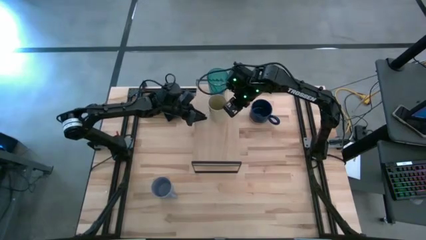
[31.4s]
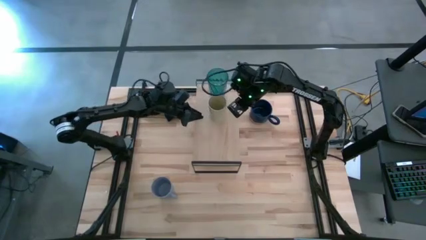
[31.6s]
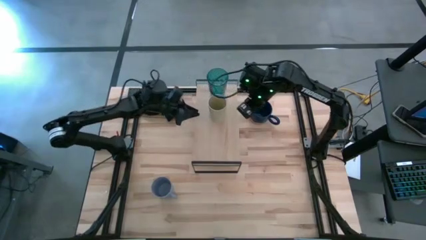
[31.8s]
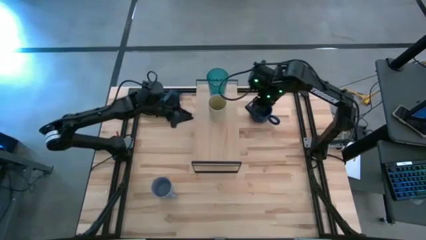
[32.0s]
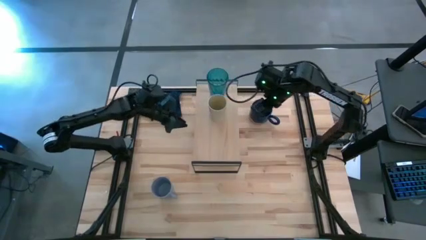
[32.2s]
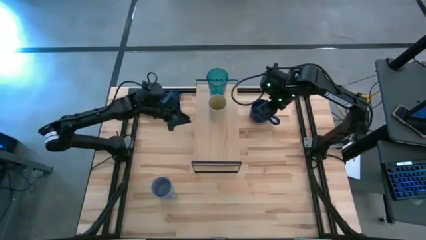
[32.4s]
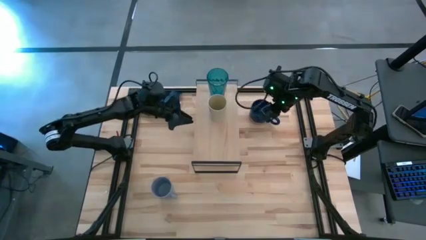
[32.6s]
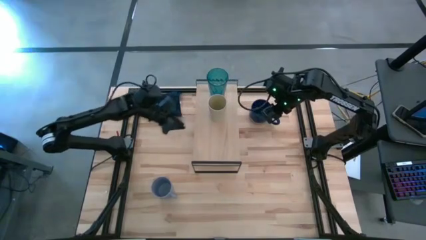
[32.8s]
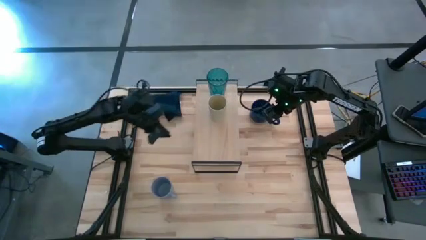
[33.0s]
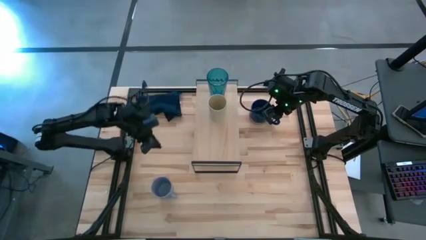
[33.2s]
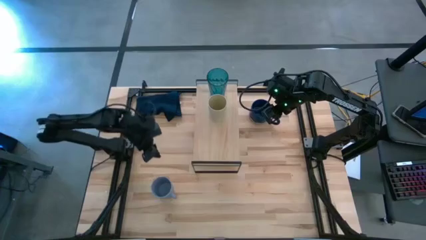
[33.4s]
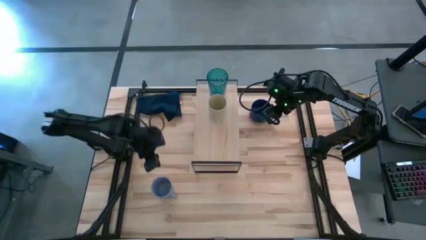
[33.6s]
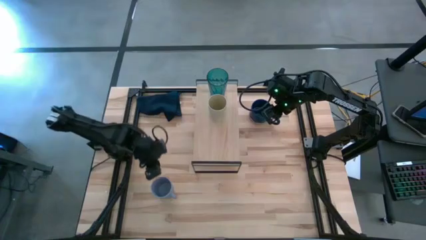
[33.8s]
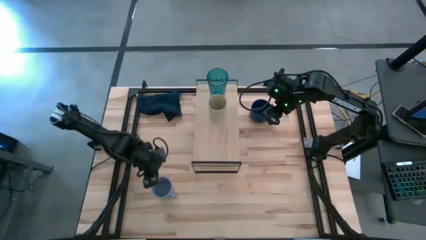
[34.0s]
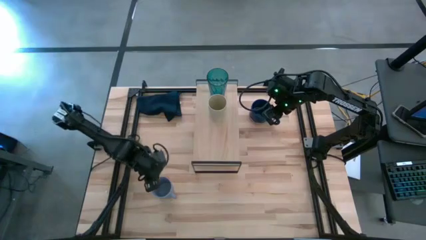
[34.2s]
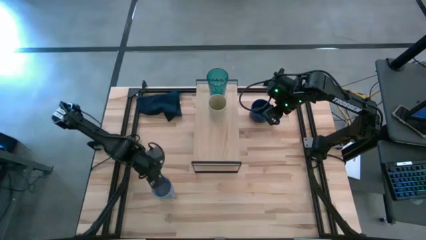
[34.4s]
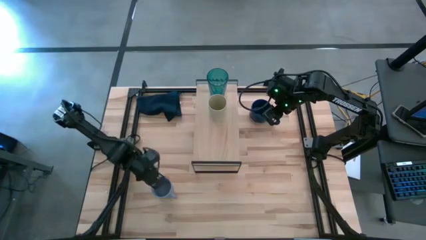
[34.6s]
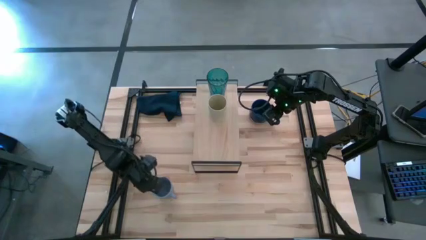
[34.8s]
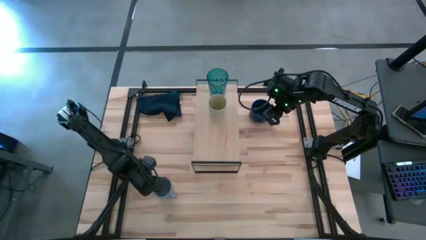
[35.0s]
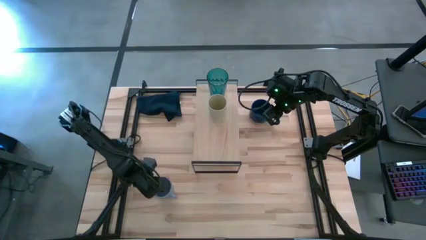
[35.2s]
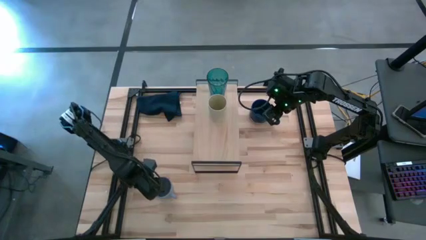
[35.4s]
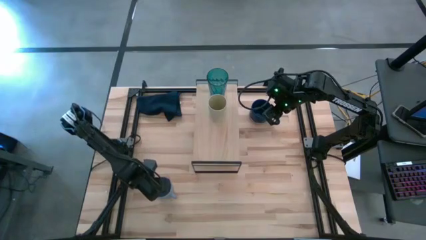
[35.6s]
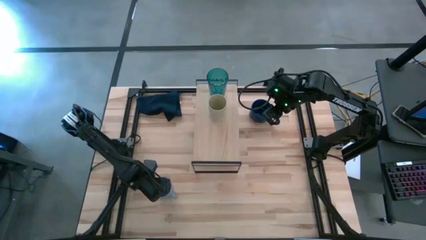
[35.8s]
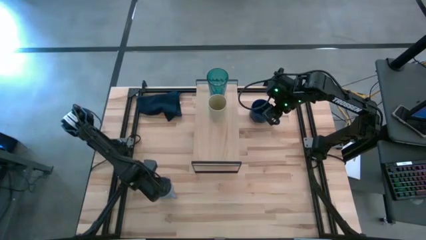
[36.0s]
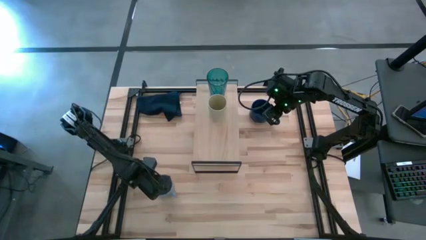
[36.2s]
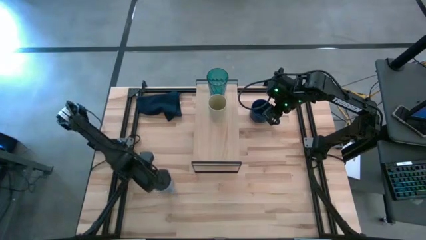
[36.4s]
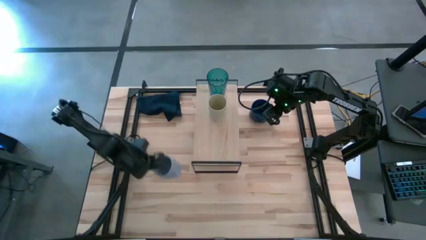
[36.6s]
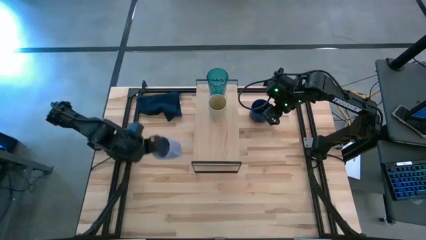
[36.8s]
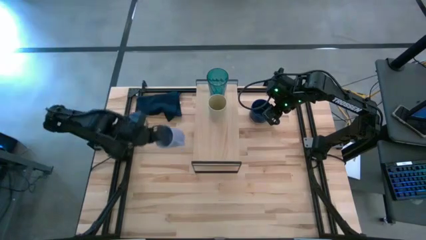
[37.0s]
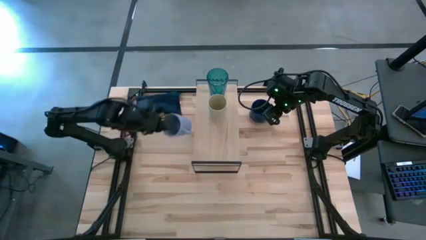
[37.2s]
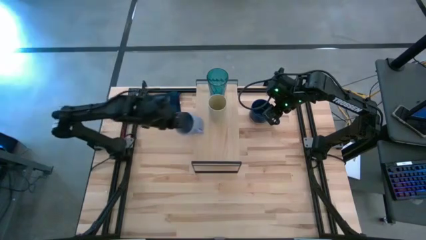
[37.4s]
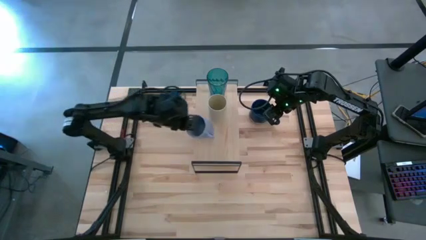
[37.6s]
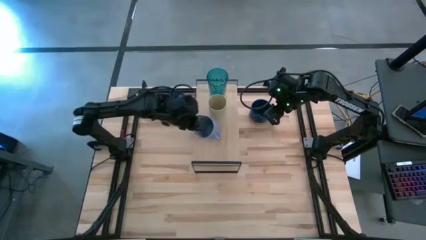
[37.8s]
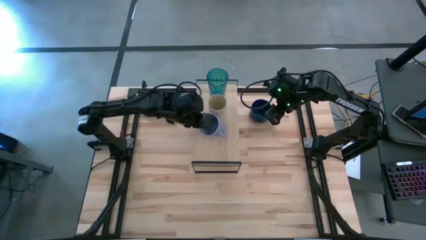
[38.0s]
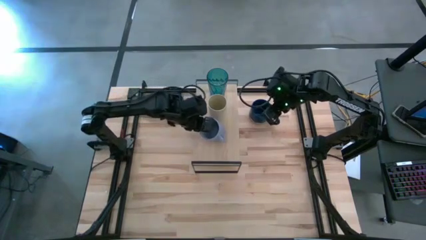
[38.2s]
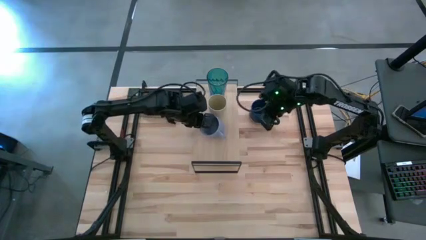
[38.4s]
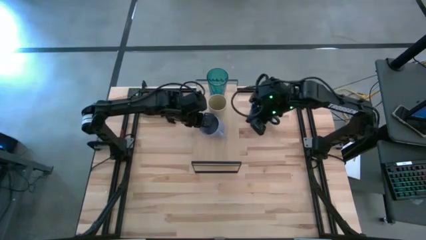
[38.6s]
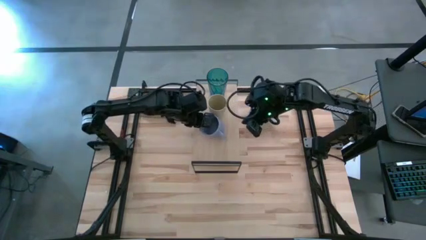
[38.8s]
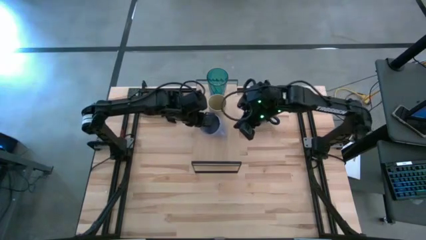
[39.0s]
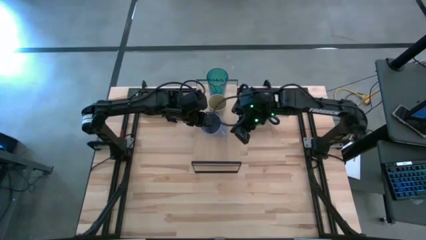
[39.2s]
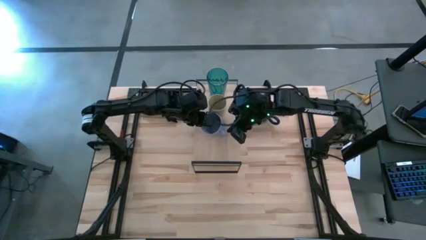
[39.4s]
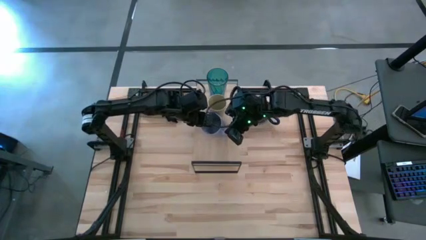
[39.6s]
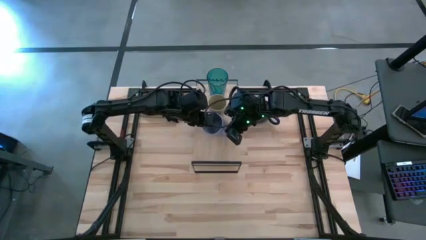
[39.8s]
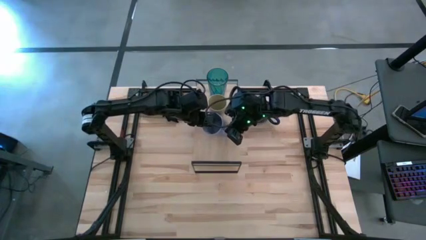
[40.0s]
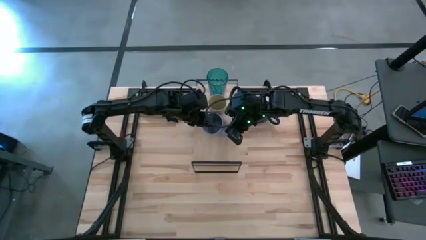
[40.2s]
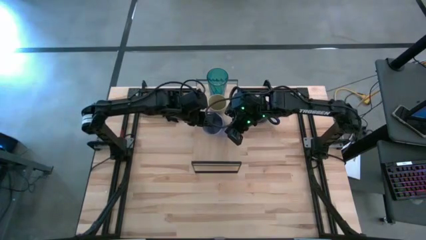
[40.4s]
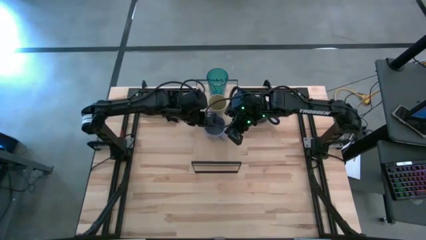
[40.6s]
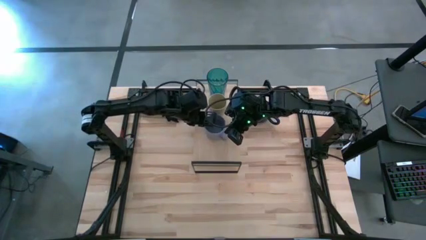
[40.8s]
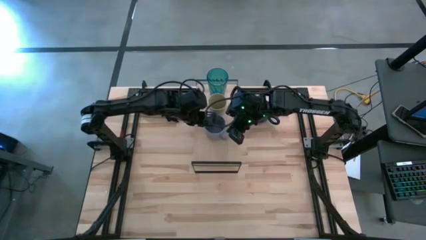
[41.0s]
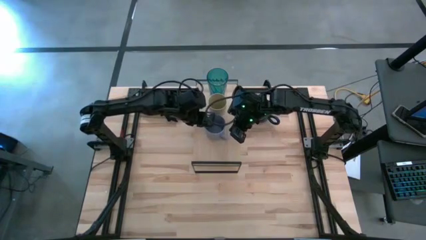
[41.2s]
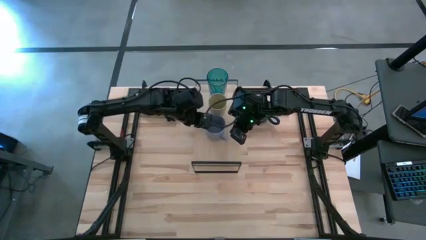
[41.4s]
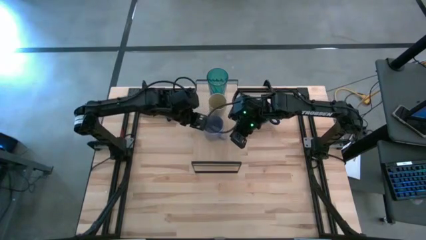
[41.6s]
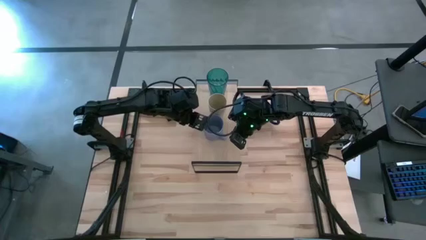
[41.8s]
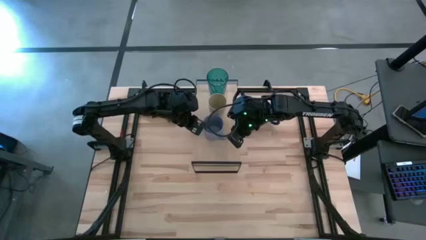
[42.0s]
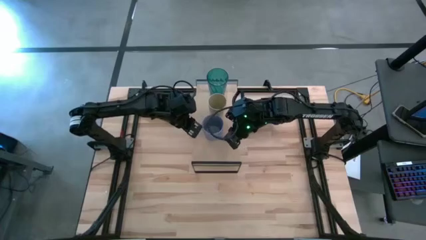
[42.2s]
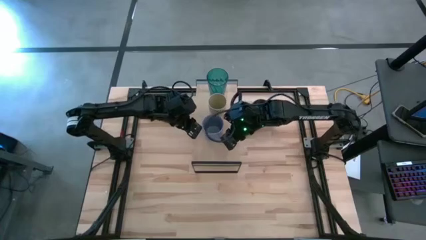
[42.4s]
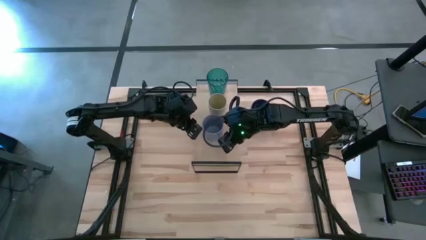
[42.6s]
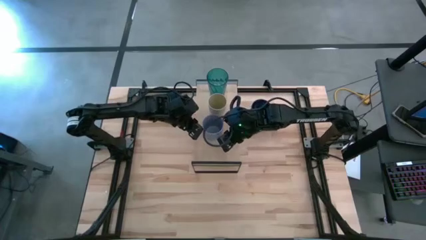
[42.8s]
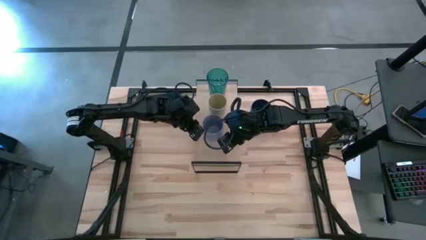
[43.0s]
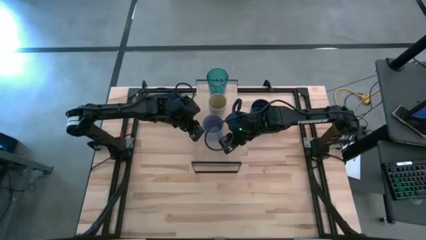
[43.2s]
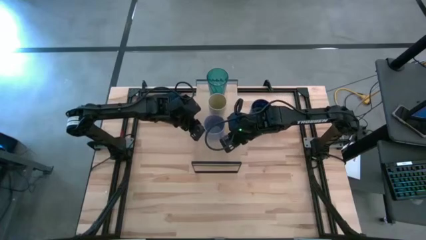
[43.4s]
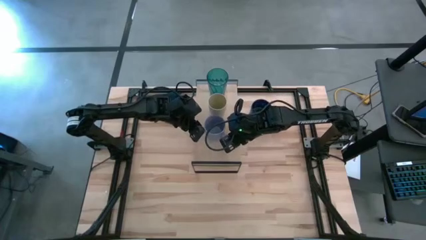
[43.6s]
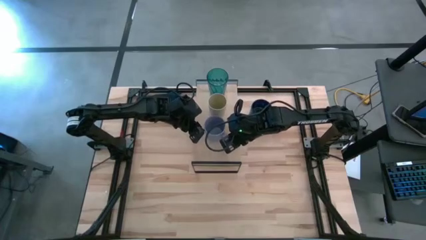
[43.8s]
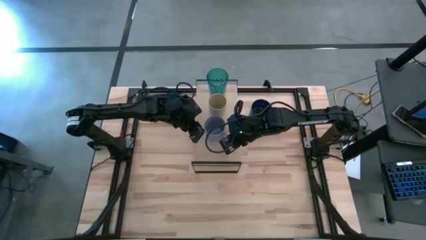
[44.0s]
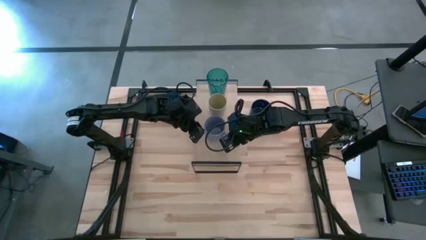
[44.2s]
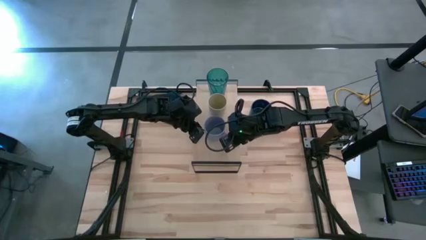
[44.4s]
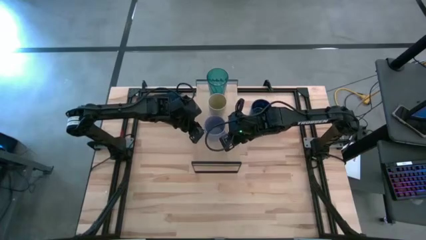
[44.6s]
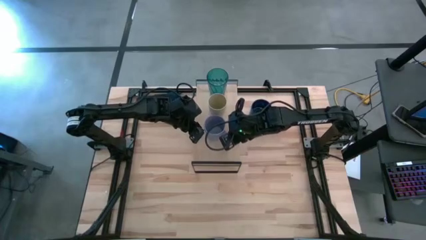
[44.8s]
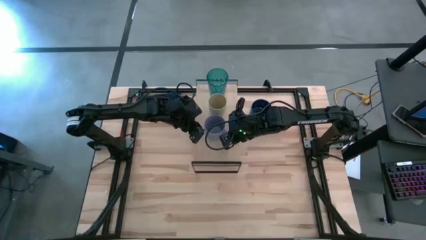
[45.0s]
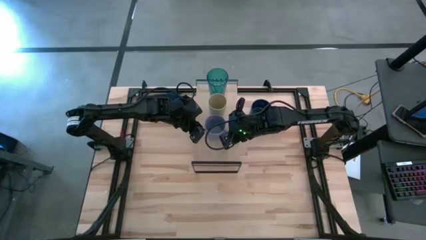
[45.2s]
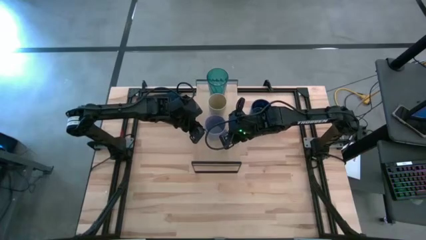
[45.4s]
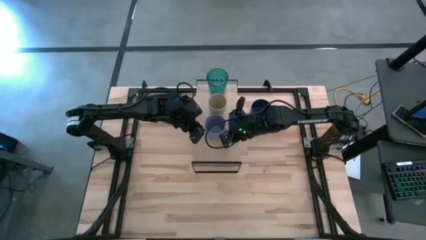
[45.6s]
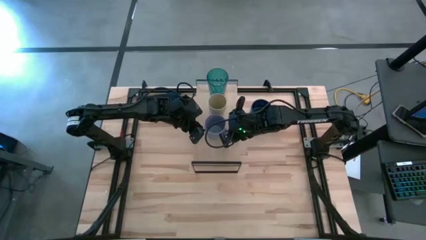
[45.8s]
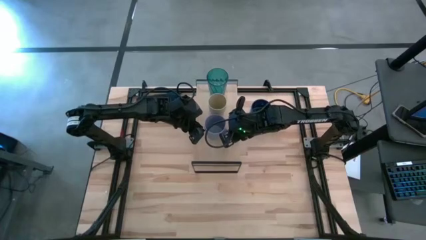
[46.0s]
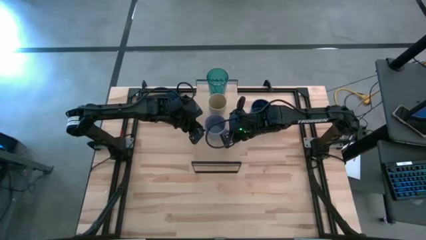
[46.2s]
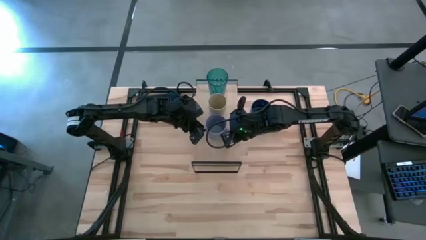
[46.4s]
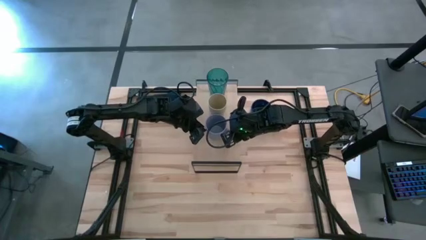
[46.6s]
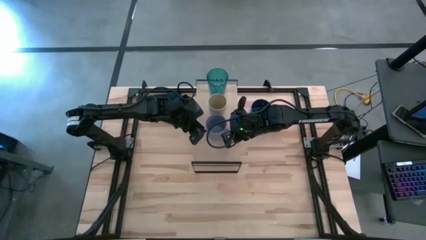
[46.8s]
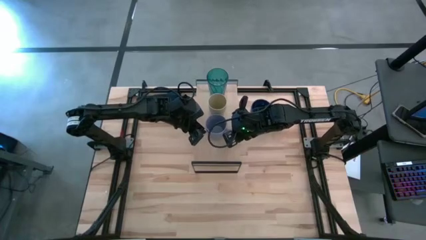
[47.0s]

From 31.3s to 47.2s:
Task: Stack small to large cups/mugs on shelf
Put the purple mug on the shelf
